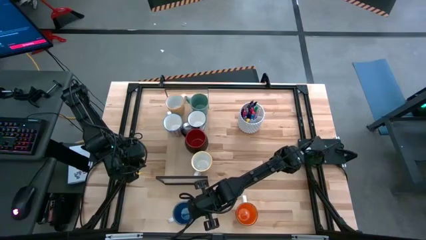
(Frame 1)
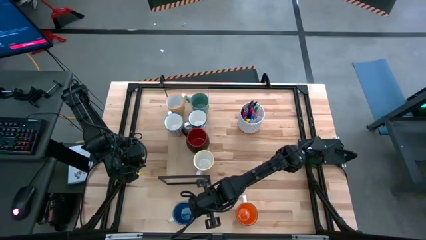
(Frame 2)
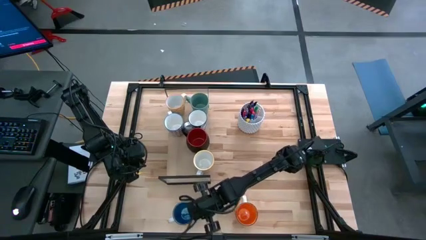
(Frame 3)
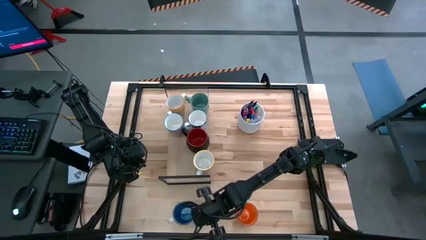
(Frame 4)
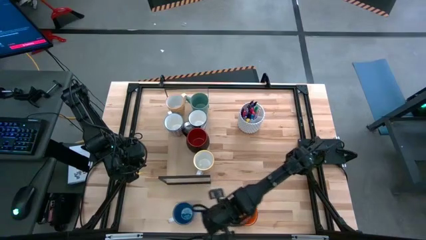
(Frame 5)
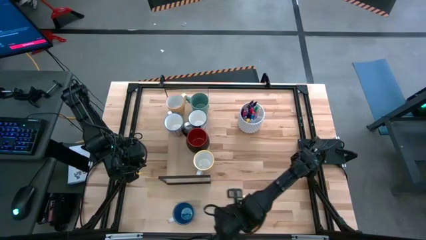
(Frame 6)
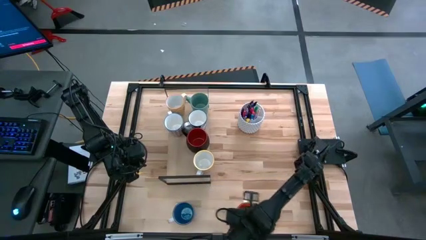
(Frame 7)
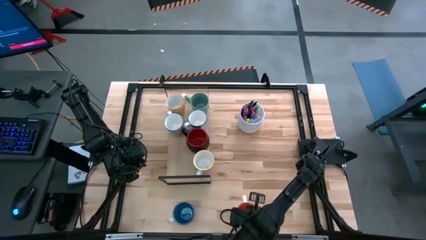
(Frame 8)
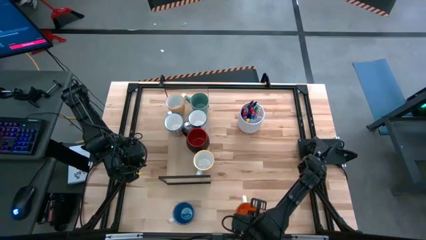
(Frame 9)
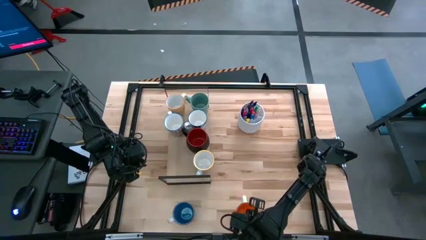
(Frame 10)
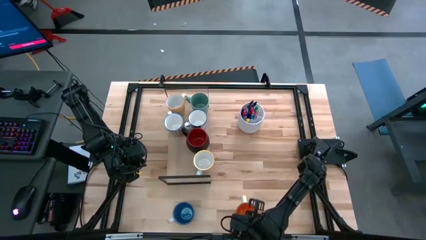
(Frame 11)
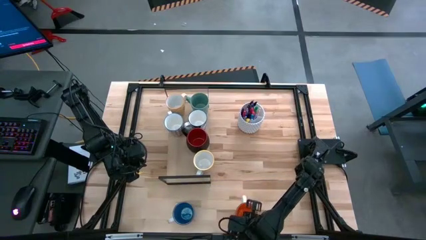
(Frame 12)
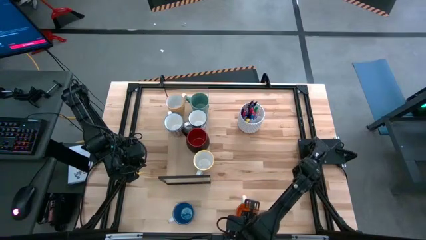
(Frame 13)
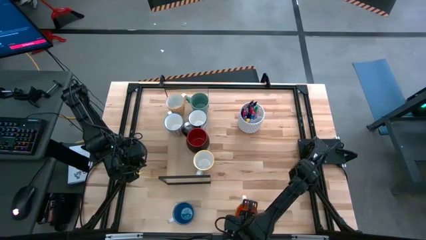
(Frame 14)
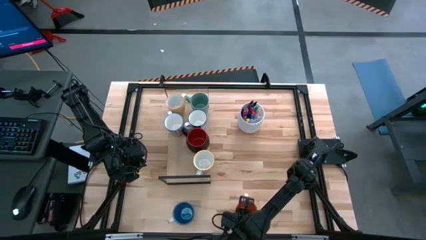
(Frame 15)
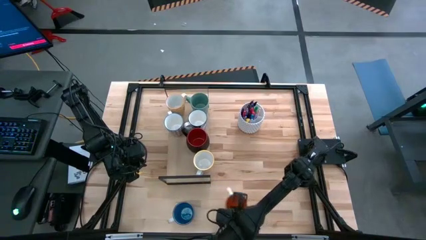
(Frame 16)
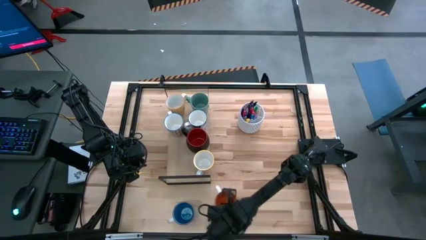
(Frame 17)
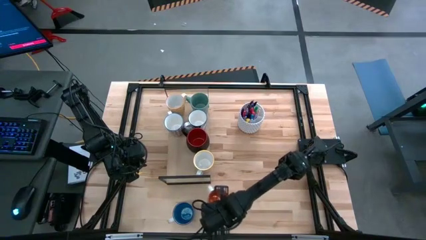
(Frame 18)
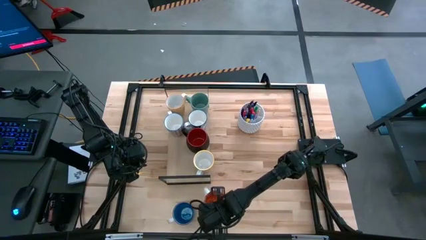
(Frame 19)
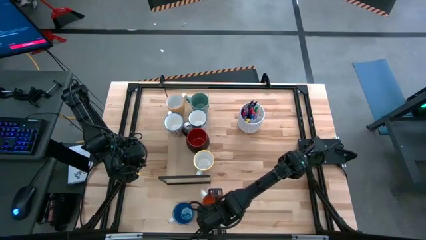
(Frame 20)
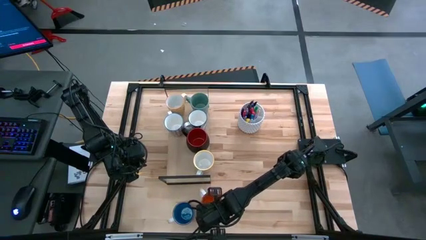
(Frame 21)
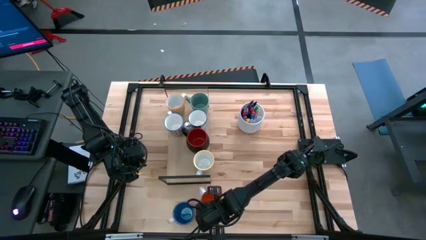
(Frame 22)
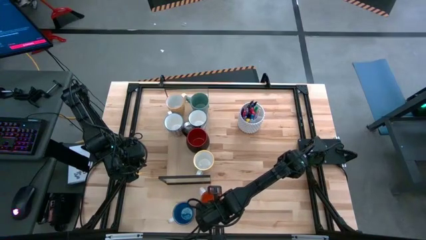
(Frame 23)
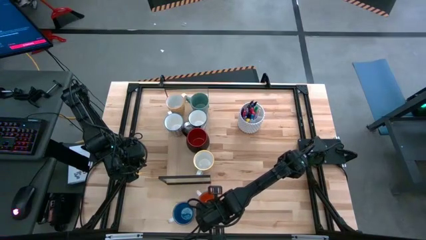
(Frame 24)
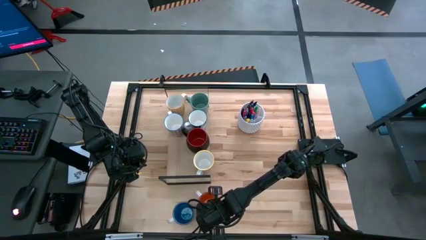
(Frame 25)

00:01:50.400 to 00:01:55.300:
Task: Place coffee mugs
Move the orange mug to the bottom middle of the table

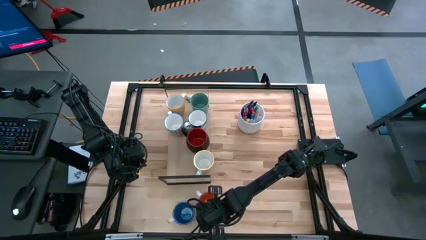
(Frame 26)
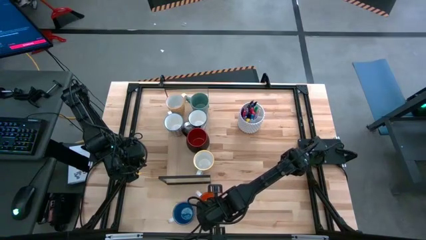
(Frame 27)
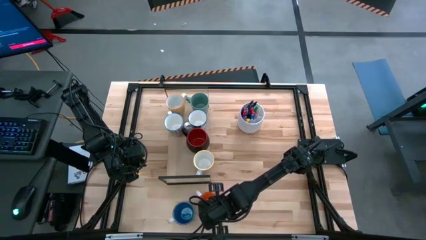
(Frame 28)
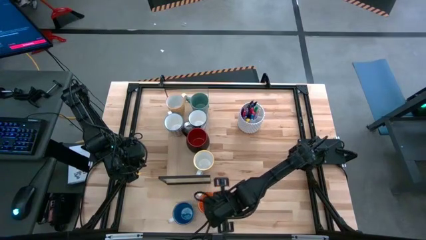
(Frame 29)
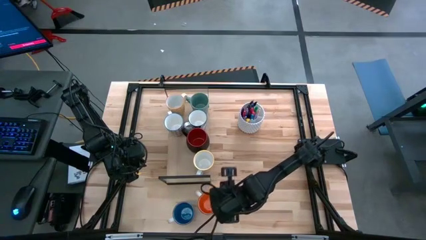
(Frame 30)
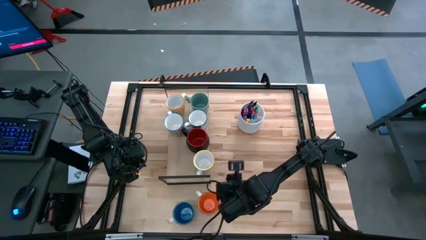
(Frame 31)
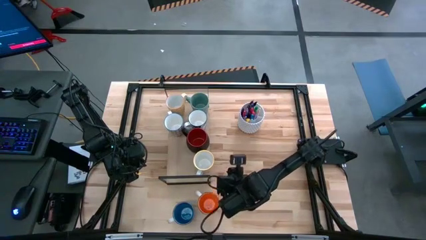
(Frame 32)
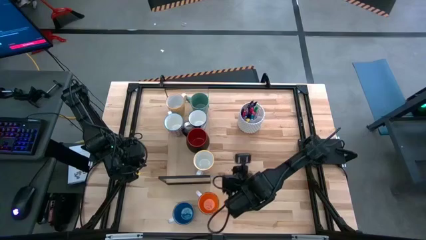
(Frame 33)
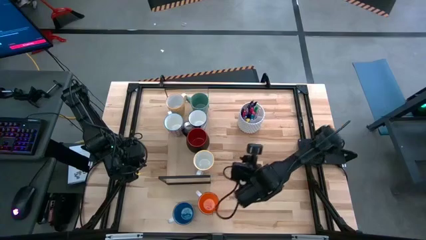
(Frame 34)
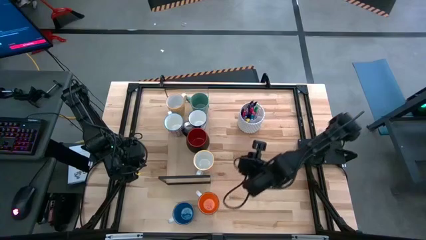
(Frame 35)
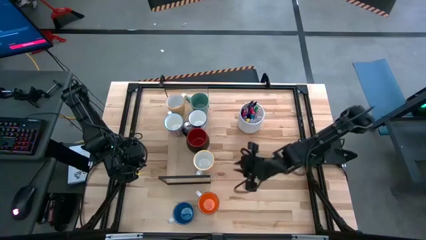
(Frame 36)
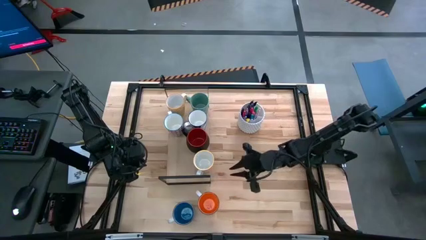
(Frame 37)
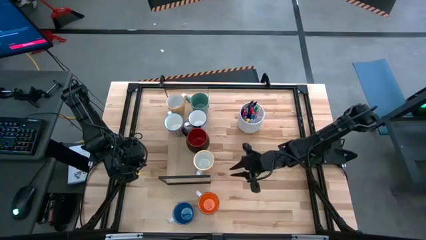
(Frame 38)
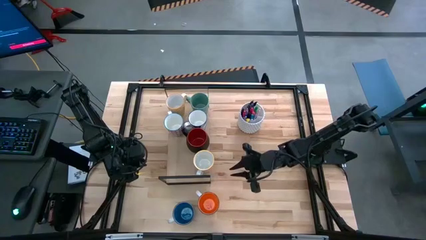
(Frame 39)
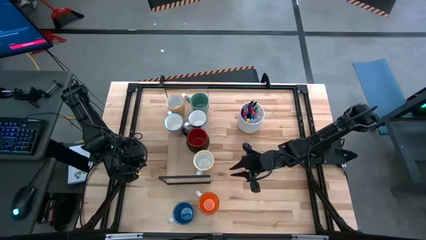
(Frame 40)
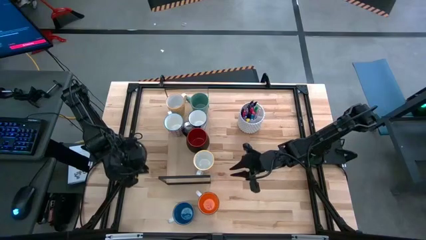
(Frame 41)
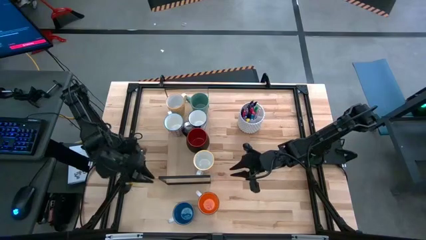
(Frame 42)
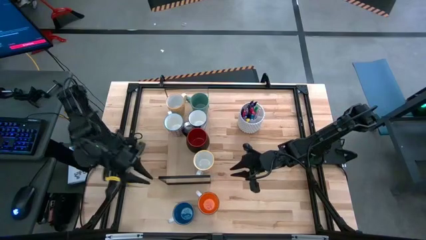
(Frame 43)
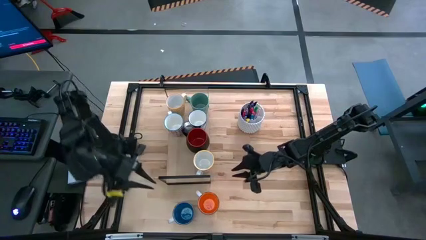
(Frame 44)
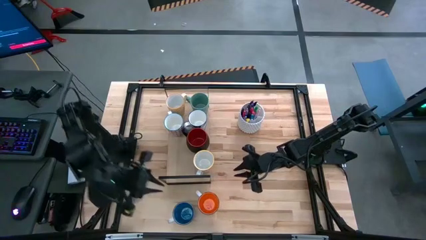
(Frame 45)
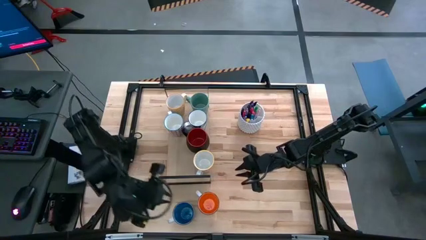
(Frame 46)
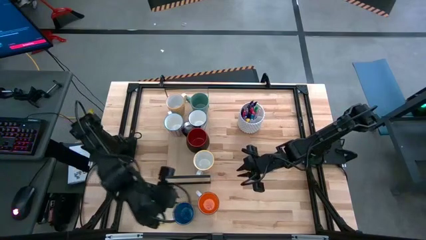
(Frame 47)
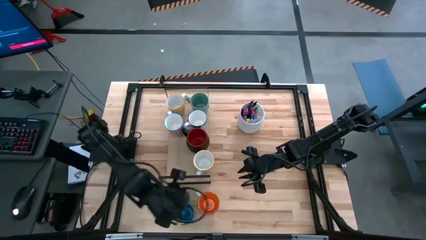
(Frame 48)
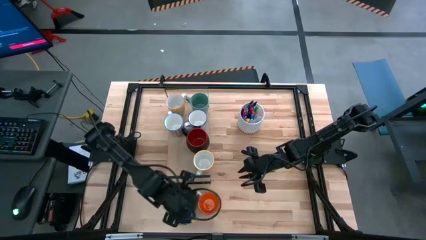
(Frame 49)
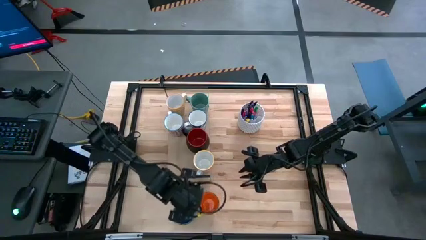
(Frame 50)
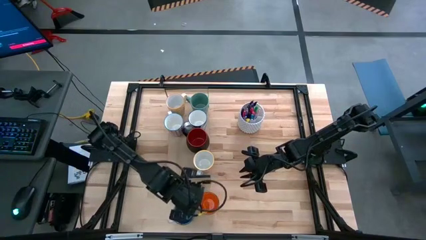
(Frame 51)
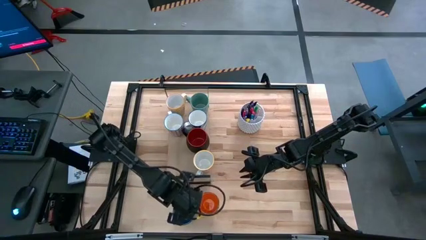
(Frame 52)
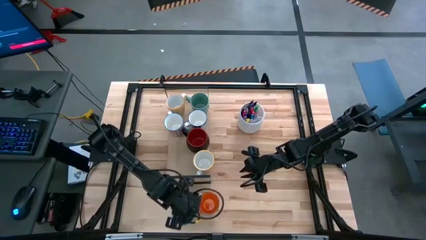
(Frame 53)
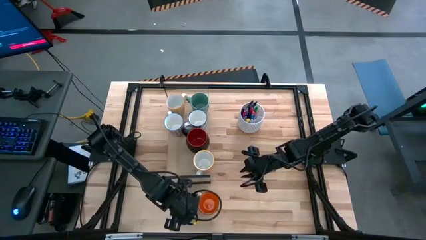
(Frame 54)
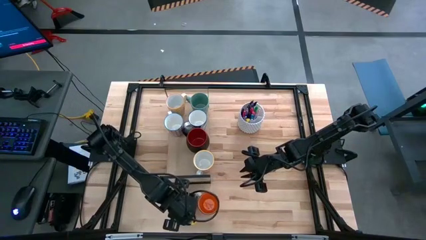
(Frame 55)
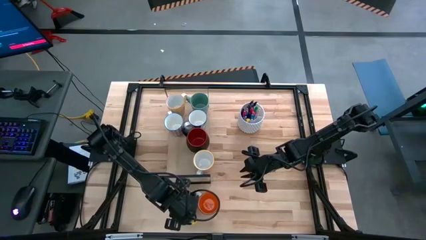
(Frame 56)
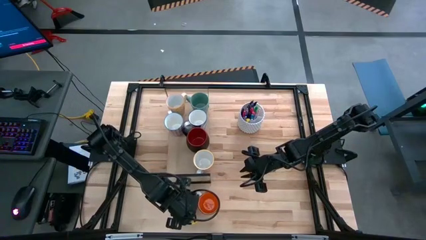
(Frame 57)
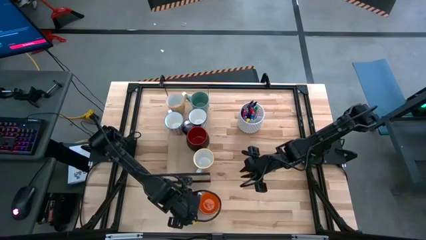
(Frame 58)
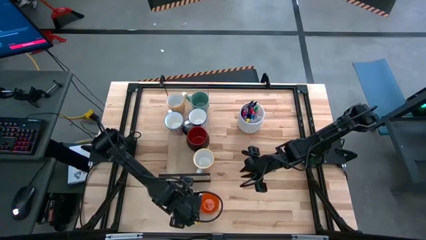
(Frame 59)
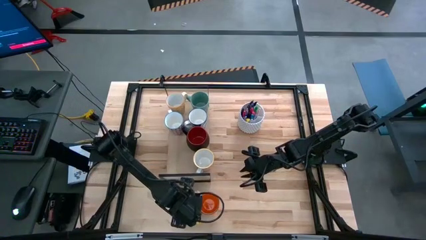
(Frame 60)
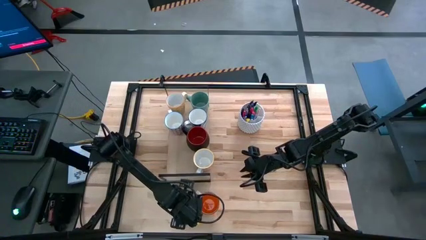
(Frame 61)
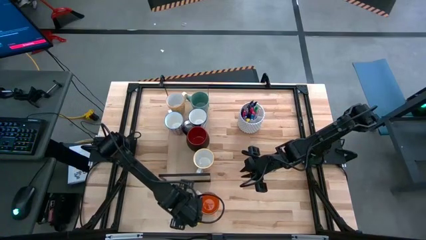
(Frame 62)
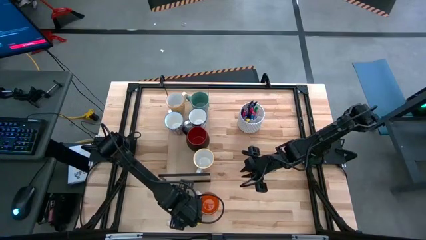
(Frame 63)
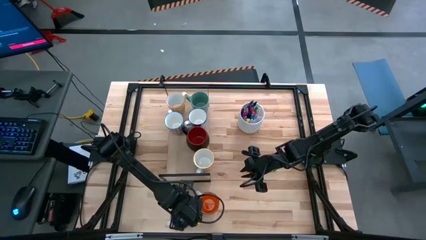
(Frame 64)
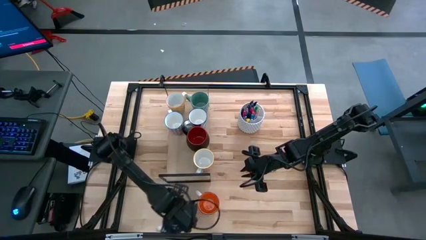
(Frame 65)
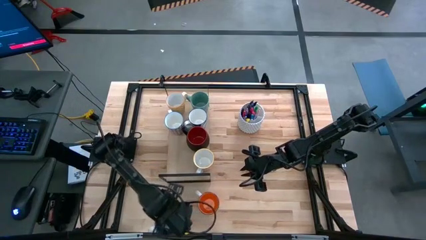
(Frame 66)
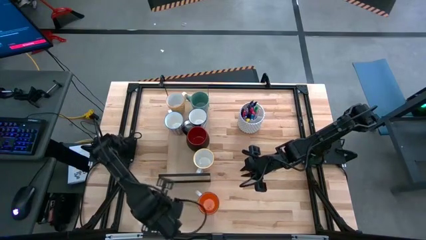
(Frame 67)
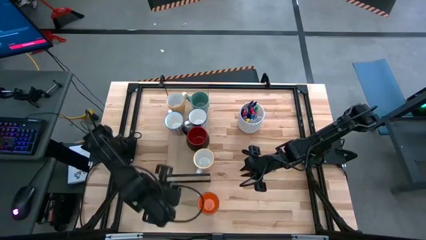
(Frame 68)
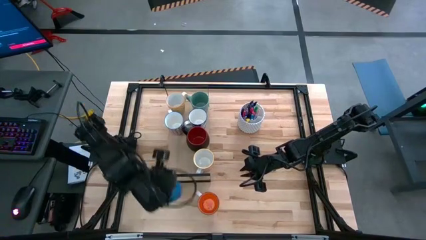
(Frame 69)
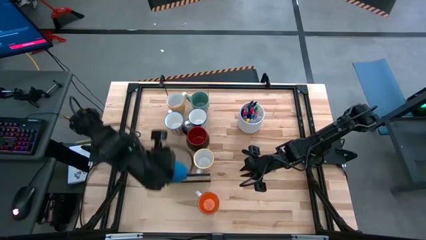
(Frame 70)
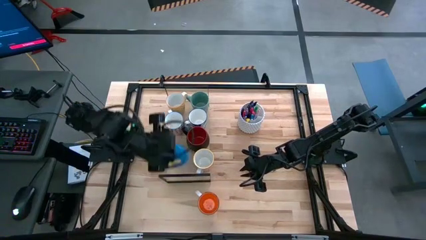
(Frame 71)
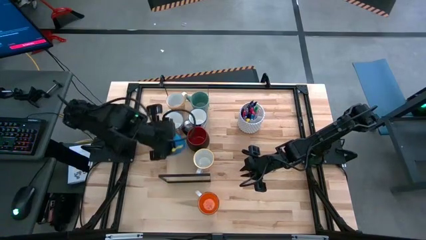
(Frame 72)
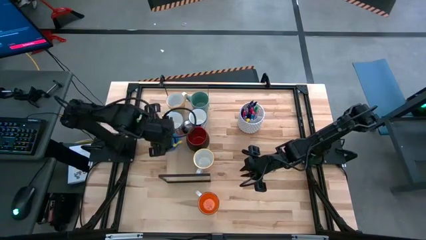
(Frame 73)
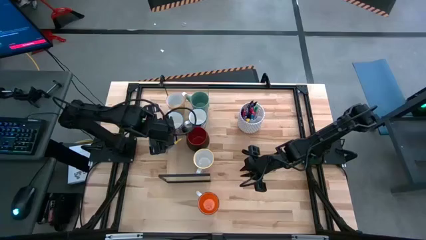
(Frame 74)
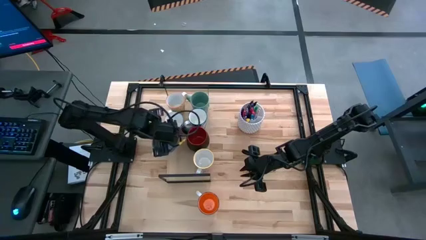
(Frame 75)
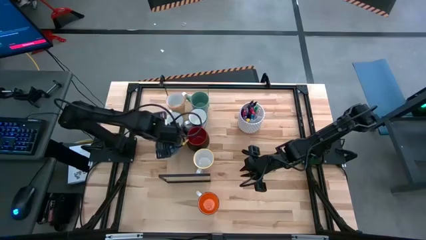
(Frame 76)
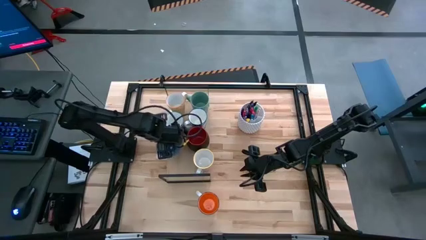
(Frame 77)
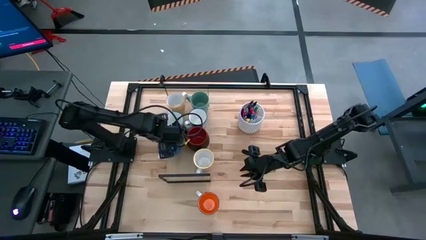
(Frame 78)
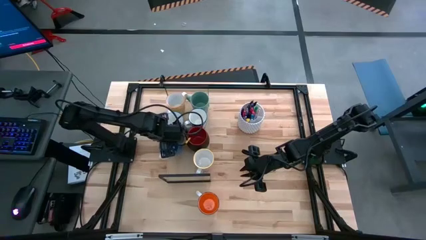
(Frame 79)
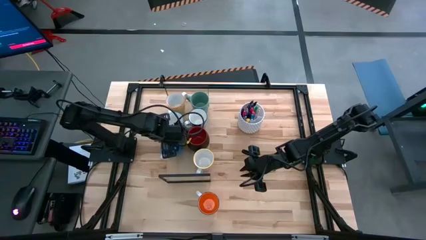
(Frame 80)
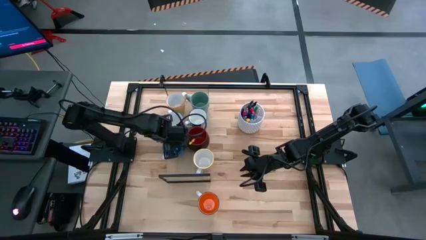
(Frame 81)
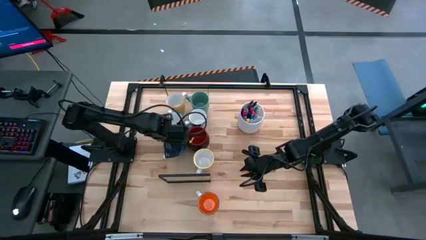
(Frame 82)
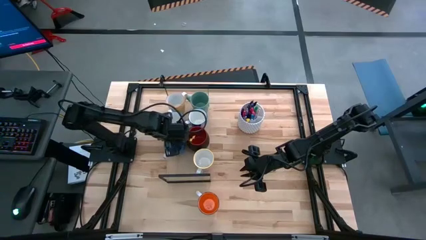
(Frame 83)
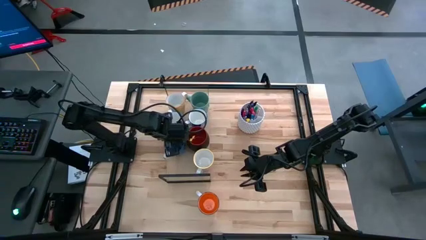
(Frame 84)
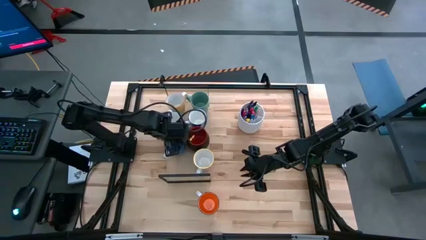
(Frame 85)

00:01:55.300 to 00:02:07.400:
Put the blue mug on the shelf
